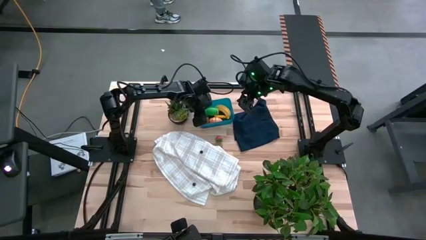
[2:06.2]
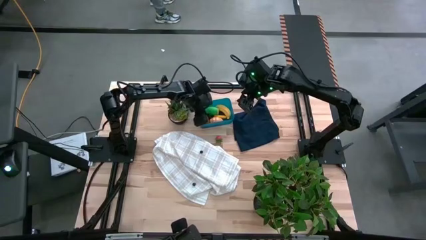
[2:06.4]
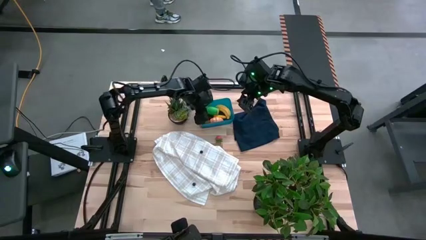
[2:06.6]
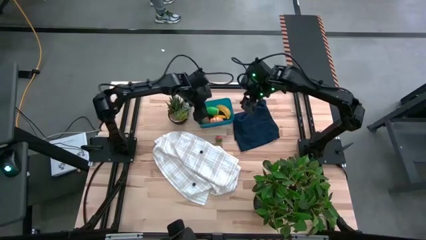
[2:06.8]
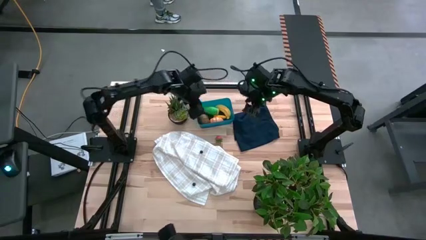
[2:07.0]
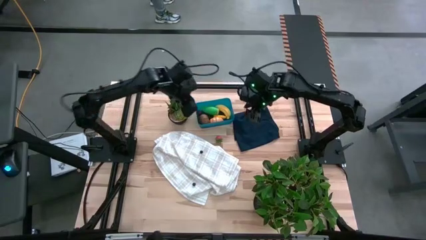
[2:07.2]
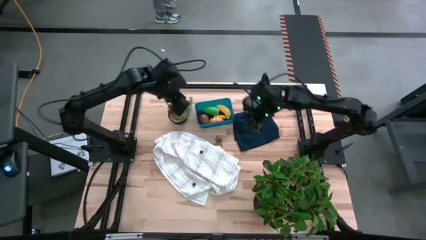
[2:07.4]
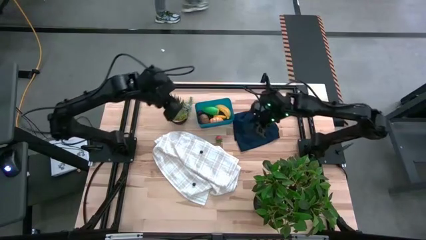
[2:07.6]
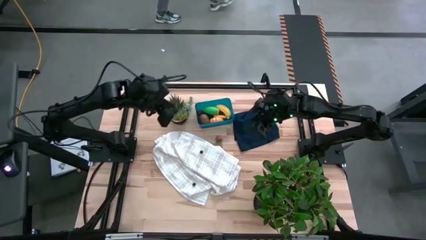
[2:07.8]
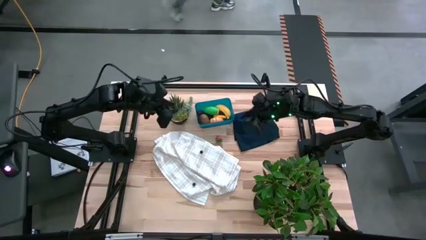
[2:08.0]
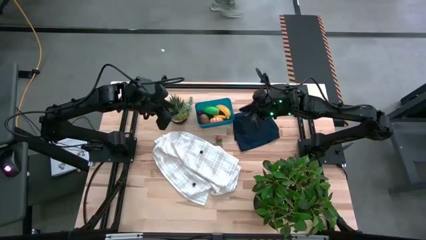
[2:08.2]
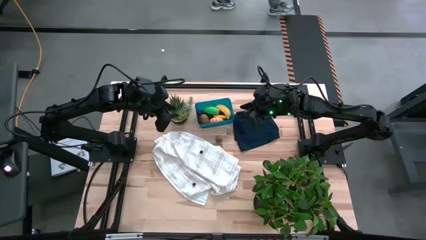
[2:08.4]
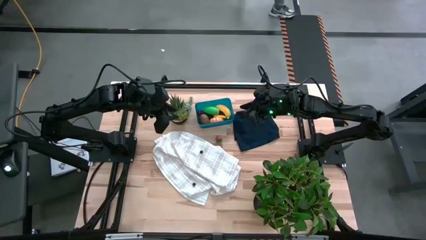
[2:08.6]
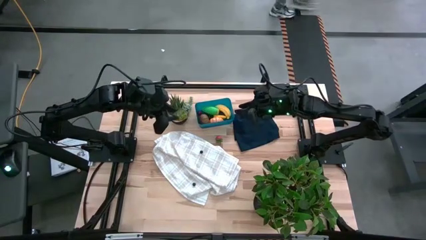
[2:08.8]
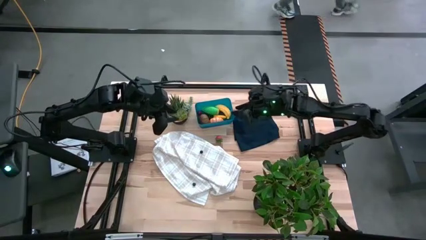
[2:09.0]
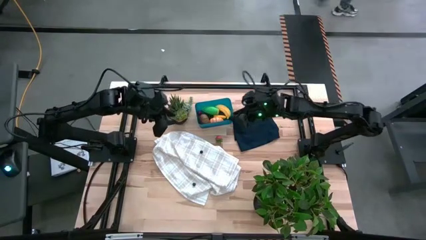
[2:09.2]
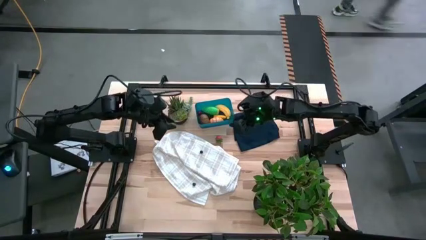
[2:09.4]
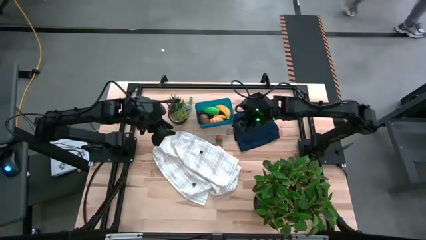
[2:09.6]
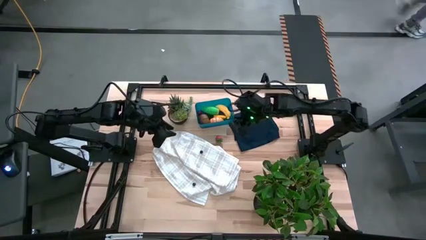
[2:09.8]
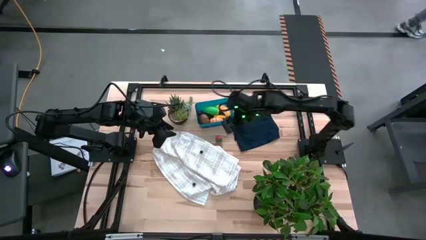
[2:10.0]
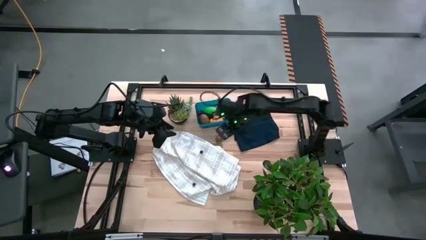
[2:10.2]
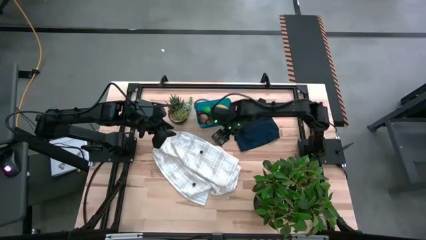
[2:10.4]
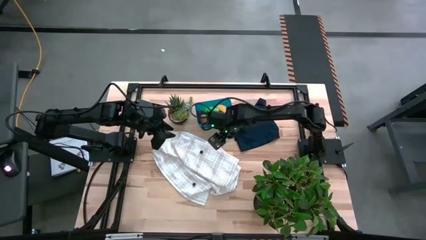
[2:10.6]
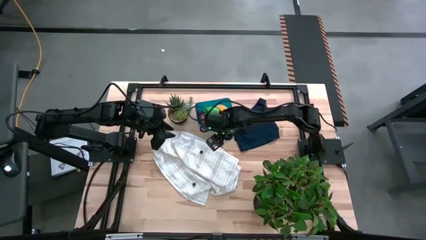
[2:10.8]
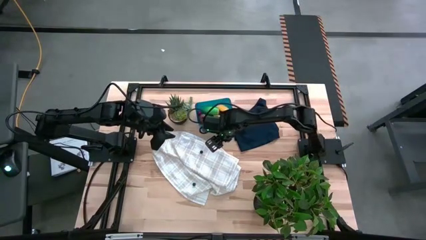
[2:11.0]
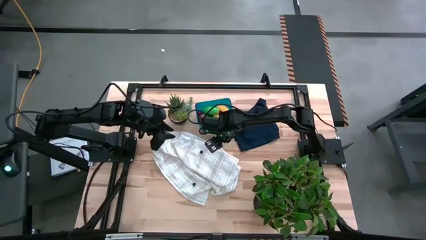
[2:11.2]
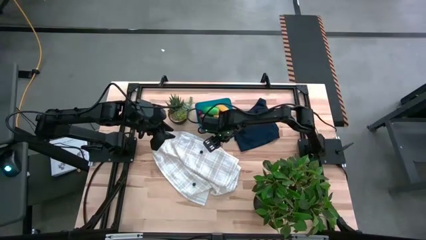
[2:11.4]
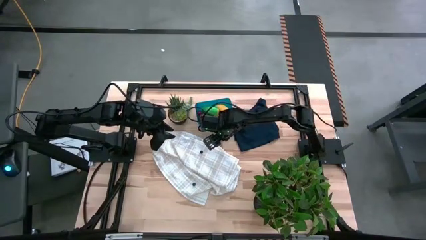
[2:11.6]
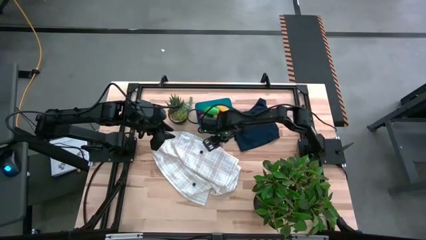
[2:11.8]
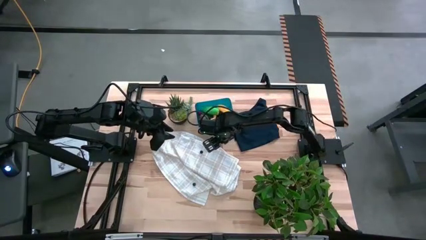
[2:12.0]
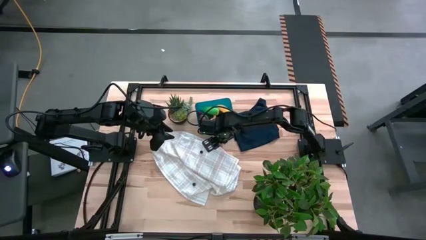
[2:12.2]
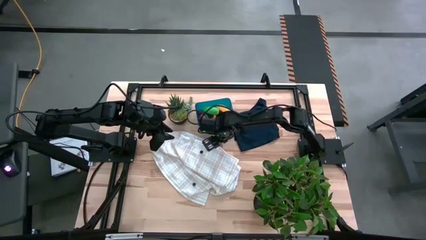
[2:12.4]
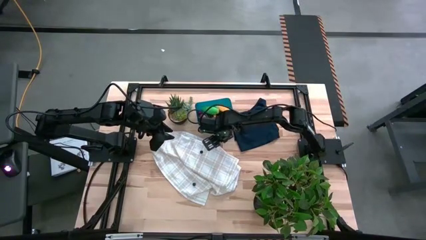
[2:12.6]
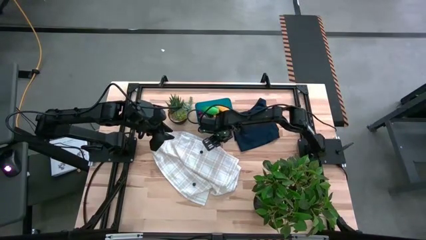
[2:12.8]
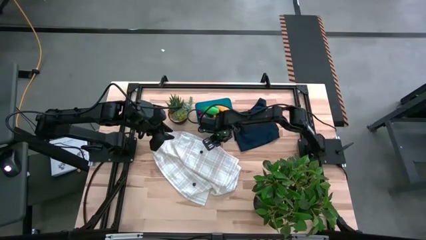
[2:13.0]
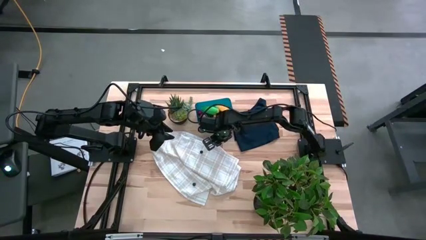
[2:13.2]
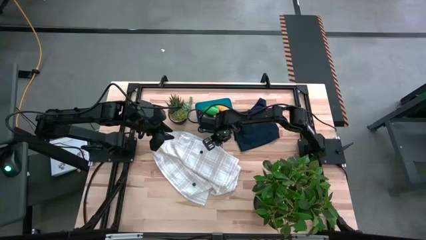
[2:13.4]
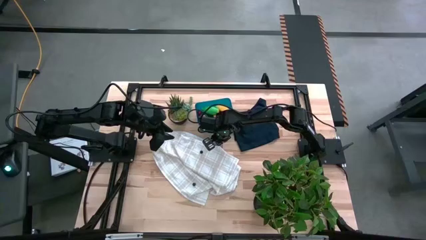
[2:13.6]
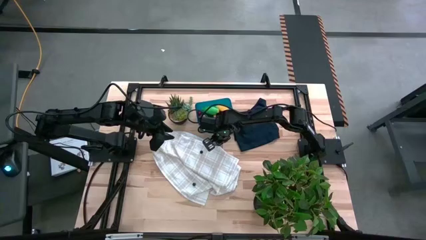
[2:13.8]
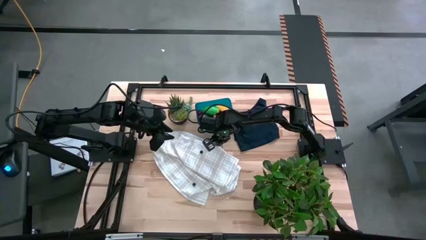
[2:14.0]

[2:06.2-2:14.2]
Task: Pick and placing Produce into tupperware
Put the strawberry into the blue bin

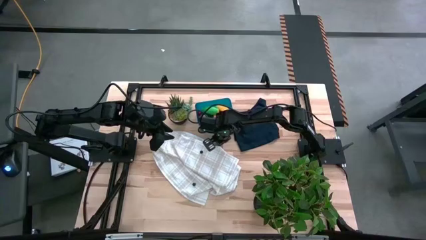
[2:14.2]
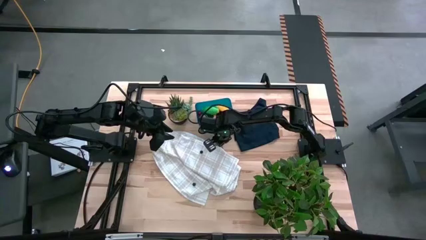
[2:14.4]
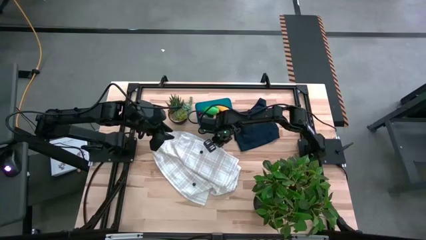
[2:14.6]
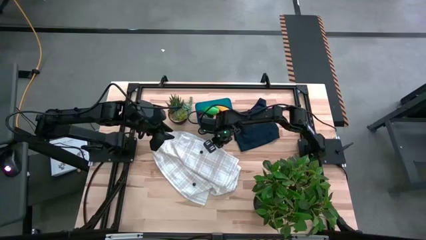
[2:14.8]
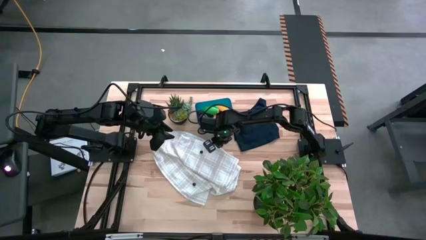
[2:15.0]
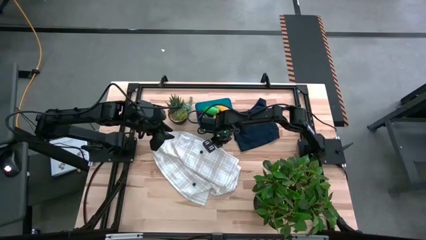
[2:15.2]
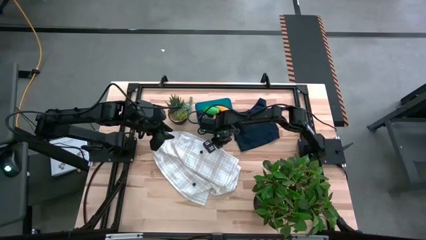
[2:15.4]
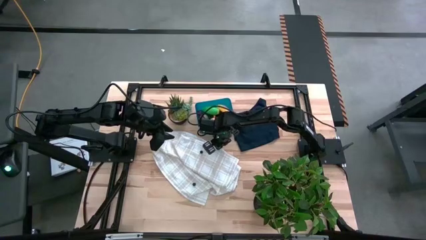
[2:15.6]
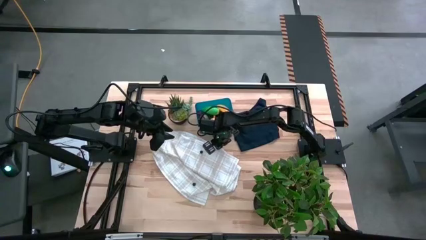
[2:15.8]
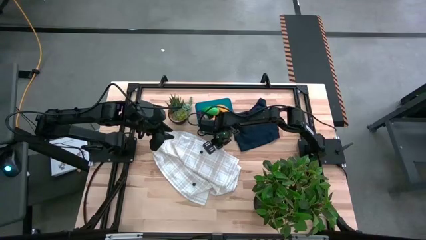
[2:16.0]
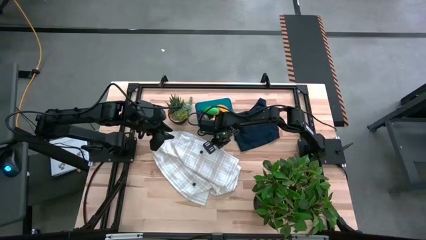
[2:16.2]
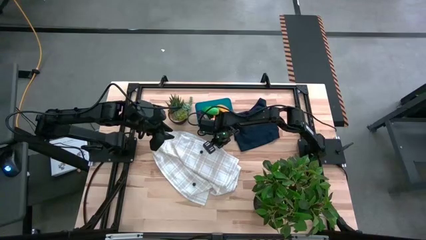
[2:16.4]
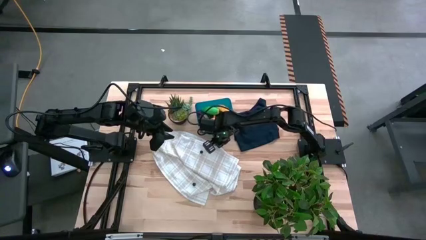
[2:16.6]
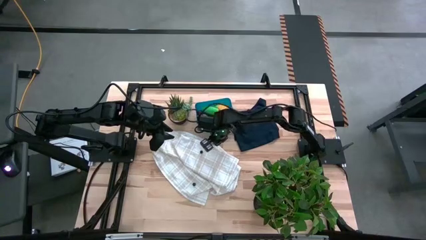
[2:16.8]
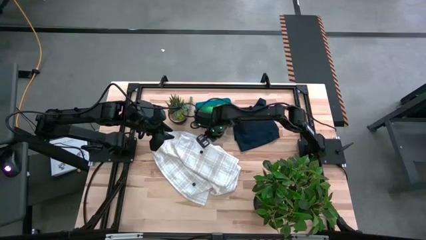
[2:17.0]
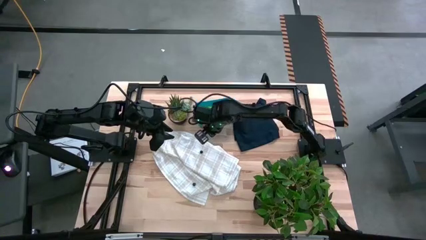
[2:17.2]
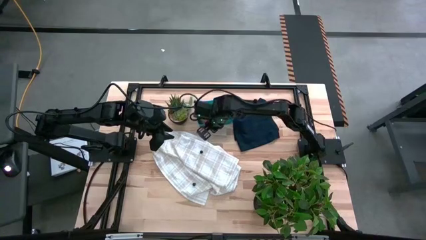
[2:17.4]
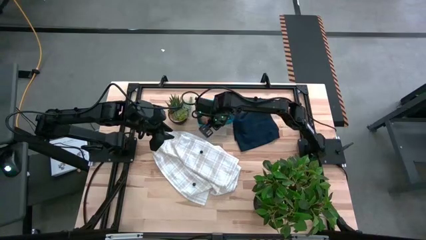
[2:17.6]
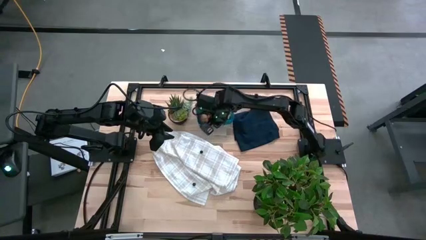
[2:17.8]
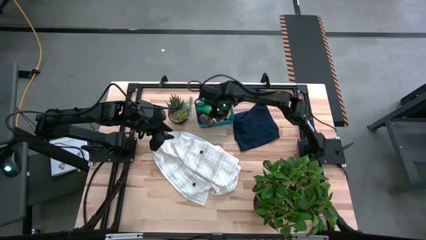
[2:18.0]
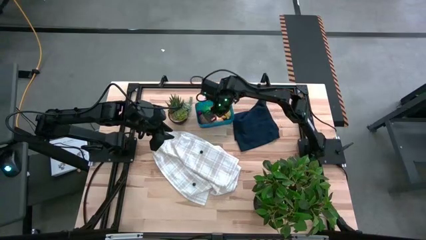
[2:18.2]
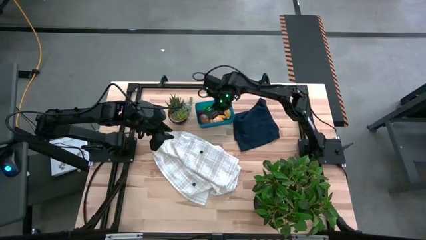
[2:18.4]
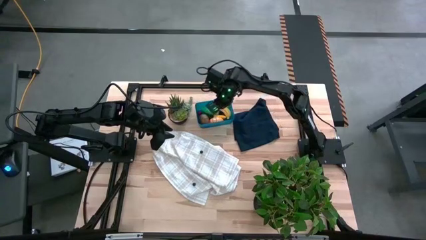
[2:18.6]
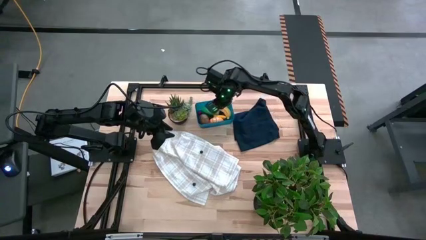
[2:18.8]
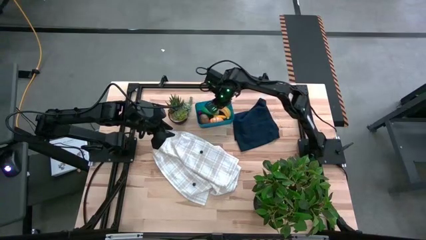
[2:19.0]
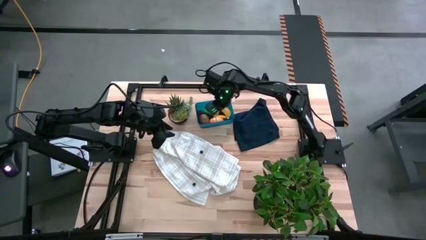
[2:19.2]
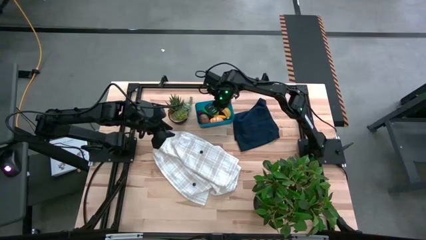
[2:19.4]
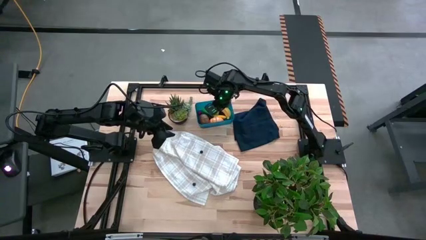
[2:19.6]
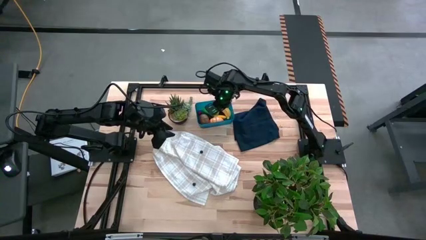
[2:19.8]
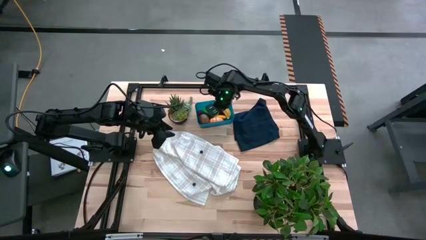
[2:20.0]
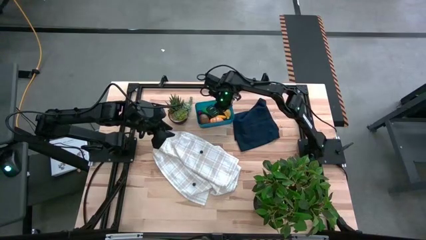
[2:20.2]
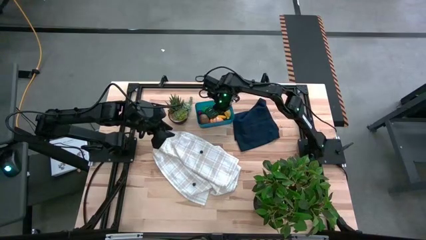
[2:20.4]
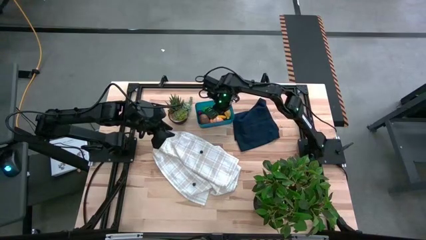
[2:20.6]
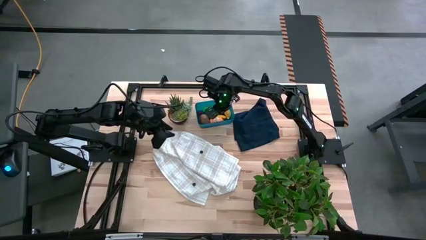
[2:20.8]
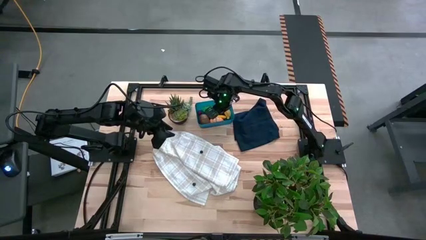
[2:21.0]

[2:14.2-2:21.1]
Put the strawberry into the blue bin
